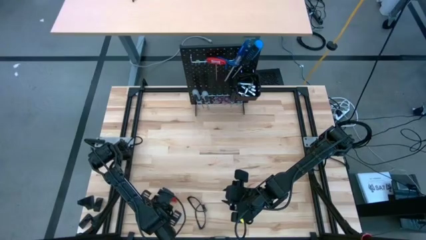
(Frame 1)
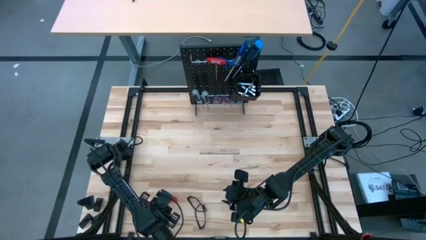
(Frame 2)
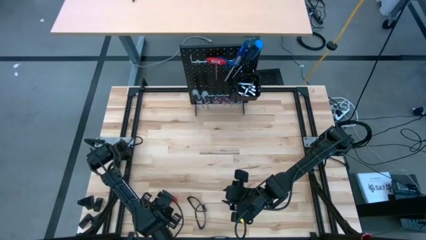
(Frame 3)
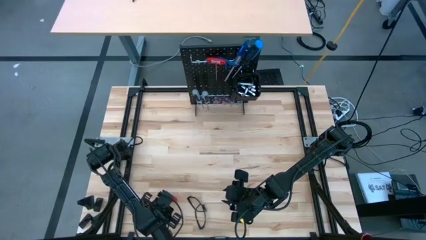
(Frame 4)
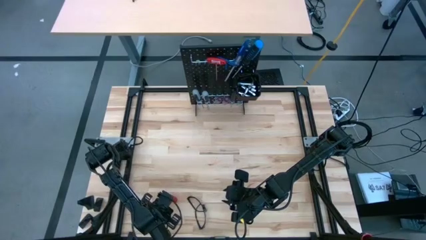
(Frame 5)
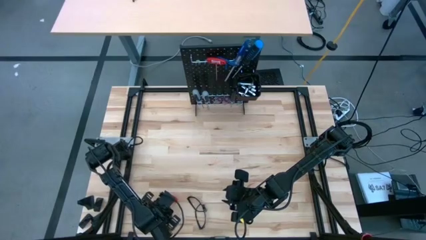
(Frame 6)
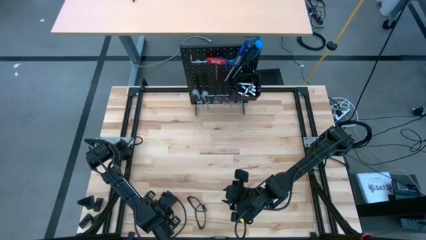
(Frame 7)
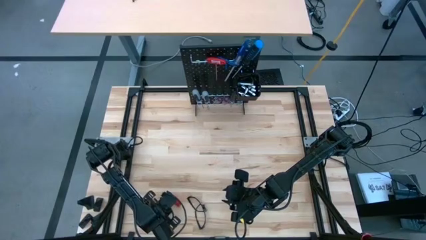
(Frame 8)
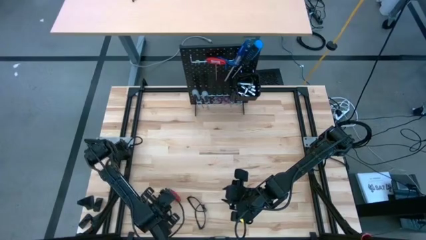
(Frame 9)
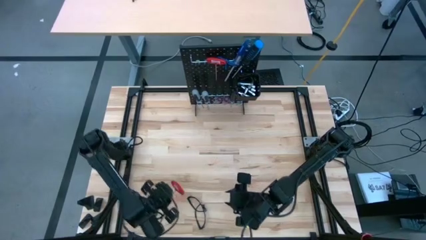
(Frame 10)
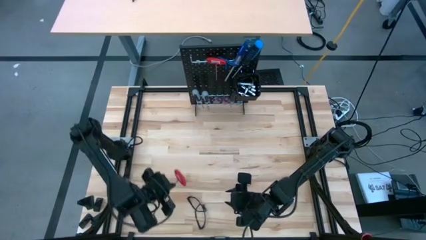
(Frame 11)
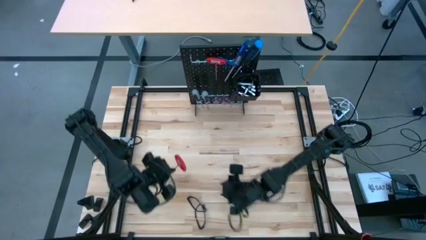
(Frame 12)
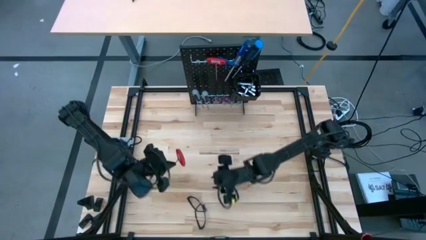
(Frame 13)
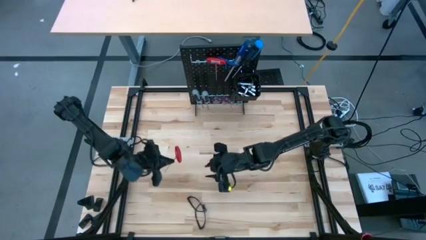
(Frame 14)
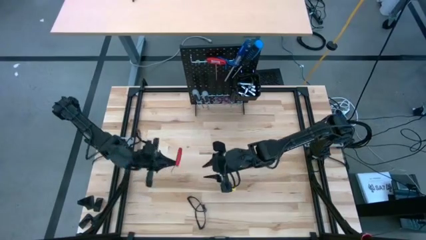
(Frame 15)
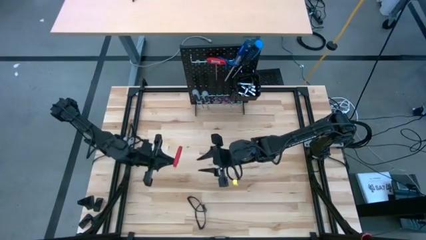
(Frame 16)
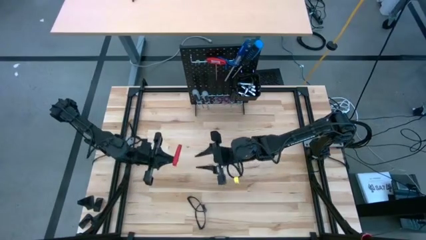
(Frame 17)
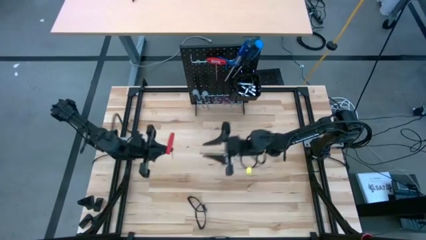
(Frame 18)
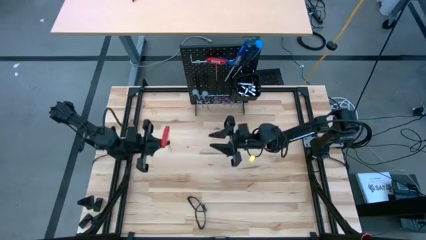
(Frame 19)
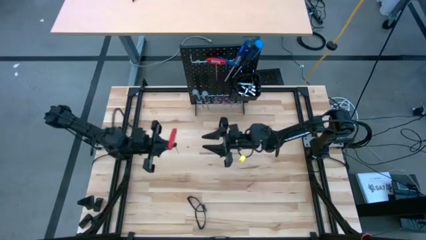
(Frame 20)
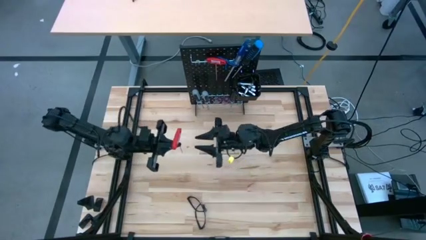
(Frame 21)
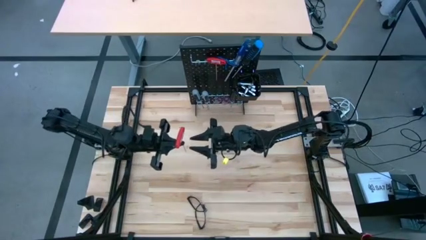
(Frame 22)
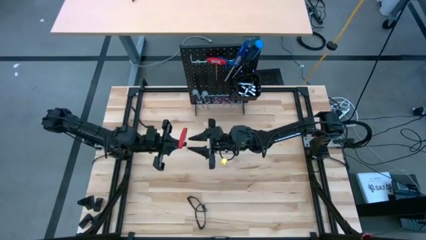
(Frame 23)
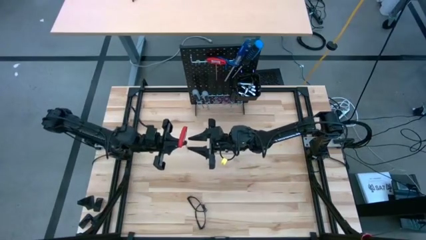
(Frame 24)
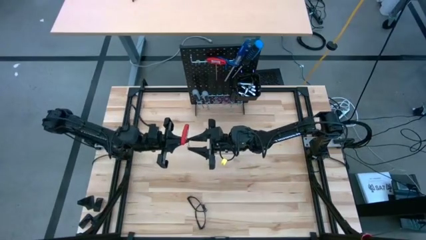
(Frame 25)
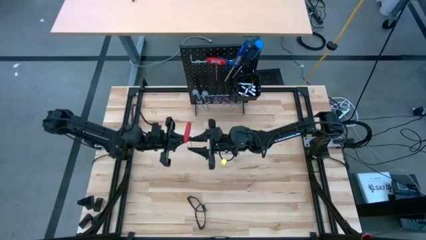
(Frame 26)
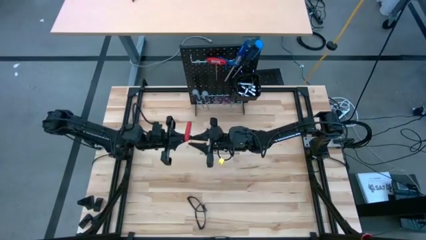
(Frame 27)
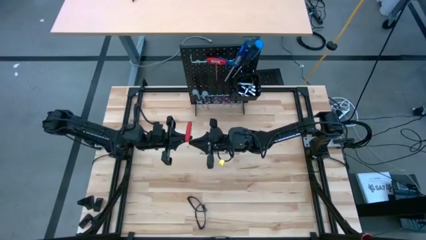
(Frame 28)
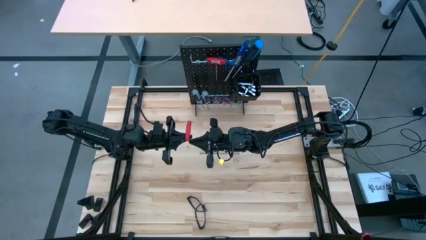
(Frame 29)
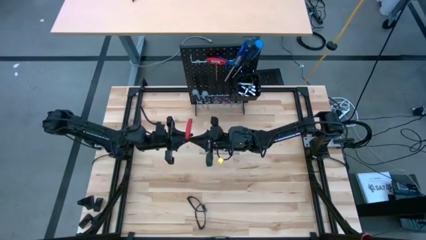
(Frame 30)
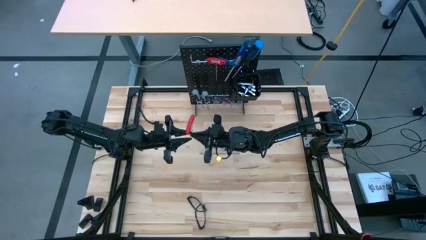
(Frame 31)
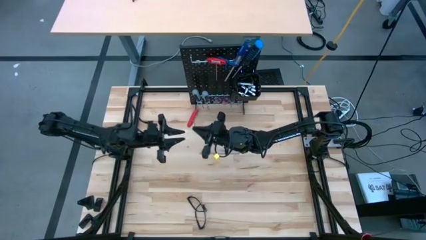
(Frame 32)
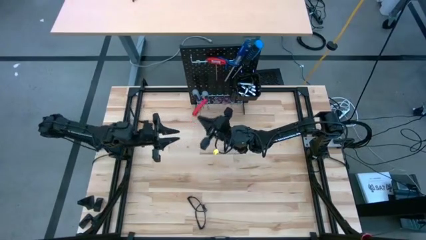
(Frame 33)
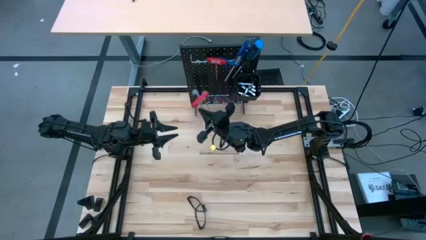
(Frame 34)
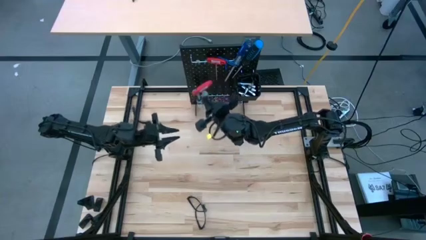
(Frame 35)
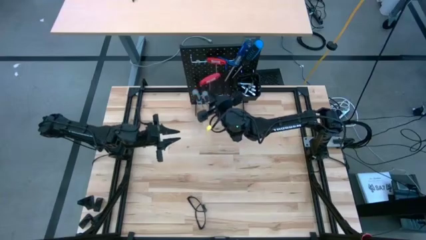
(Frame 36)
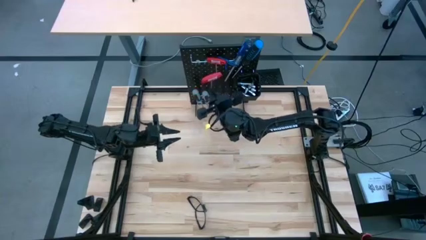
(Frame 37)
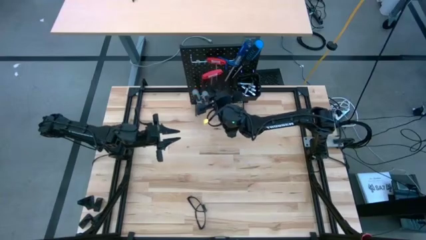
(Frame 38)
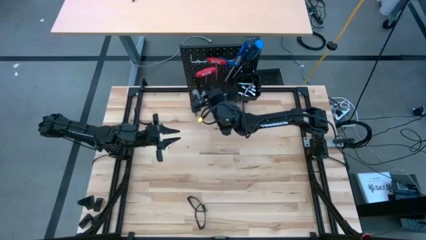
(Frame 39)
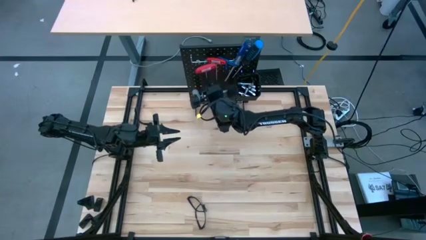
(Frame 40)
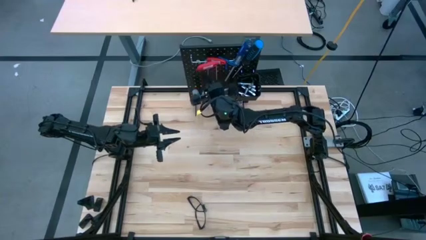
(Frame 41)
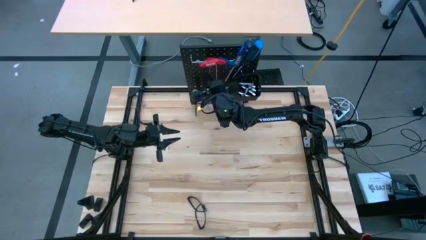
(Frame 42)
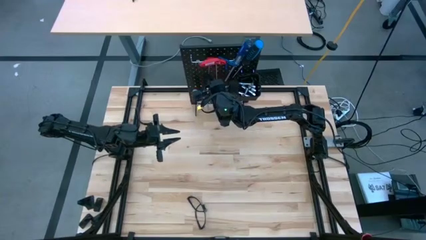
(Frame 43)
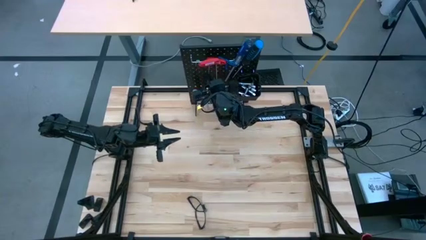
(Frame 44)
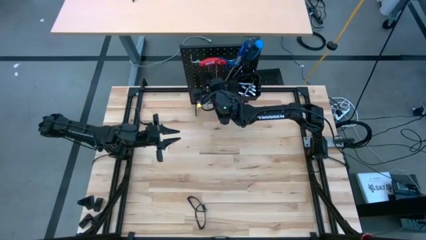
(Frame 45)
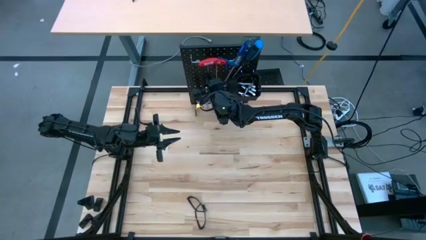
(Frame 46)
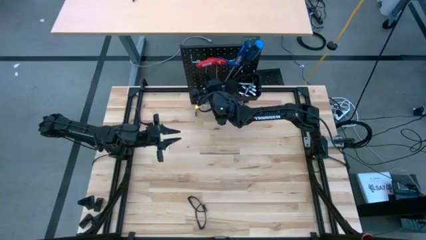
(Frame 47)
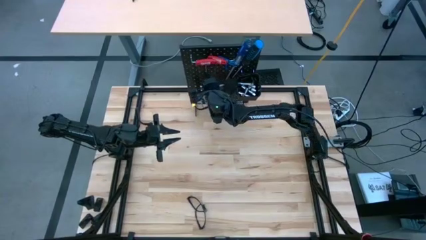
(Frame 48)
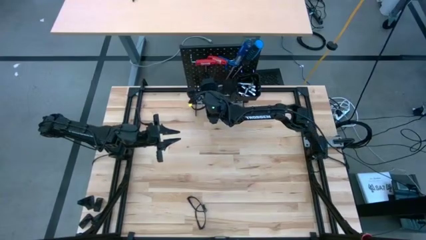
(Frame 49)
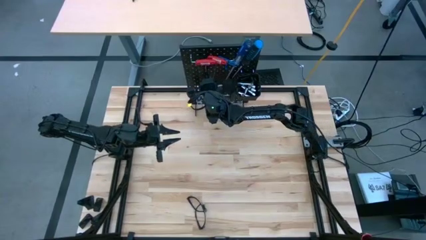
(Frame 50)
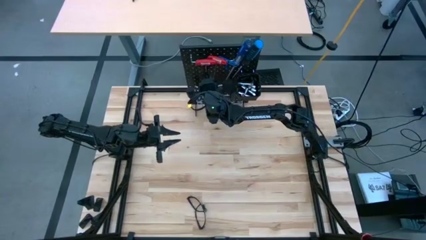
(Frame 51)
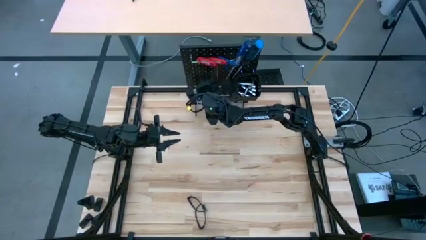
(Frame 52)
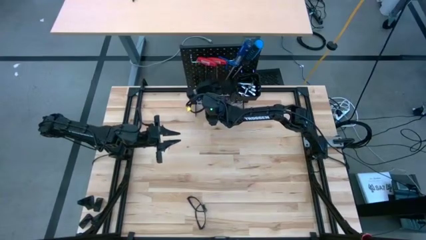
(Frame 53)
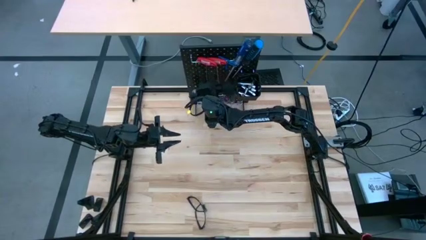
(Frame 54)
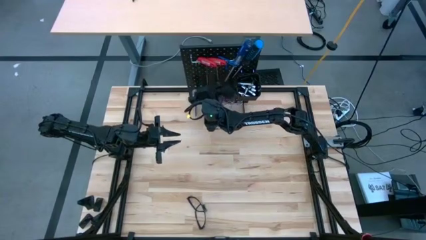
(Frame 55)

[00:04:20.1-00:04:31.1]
Task: Hang tools onto peg board
Hang the allen wrench on the pegboard

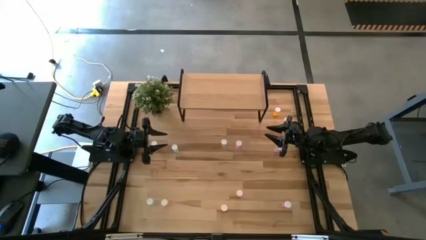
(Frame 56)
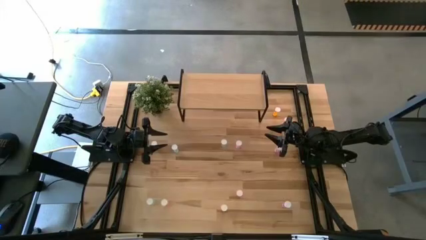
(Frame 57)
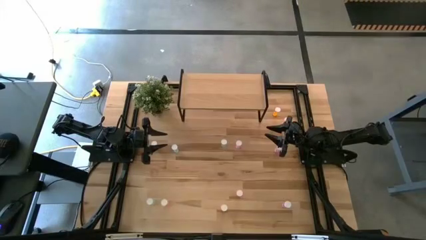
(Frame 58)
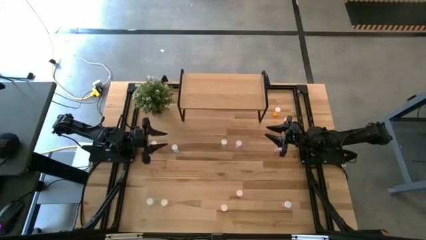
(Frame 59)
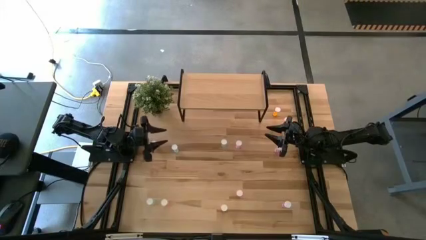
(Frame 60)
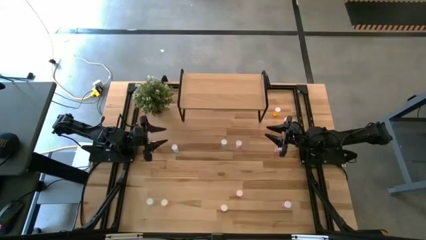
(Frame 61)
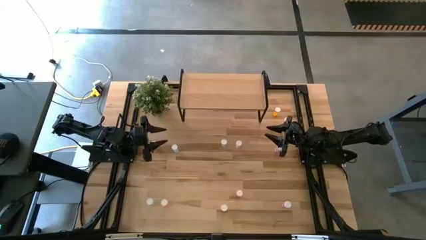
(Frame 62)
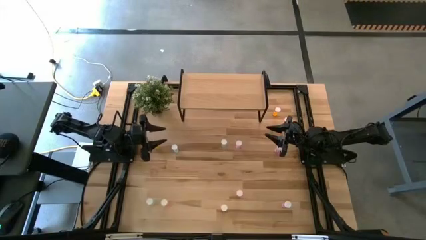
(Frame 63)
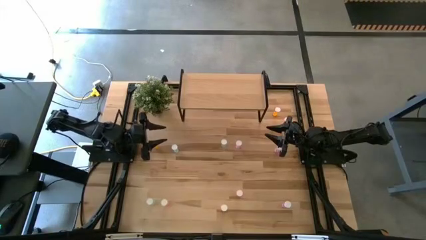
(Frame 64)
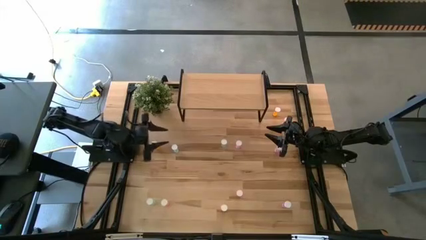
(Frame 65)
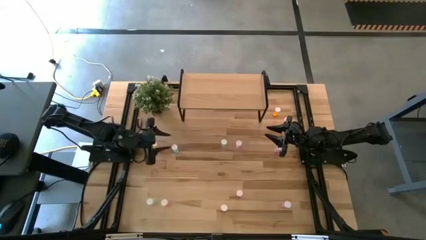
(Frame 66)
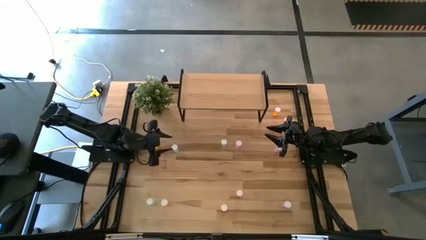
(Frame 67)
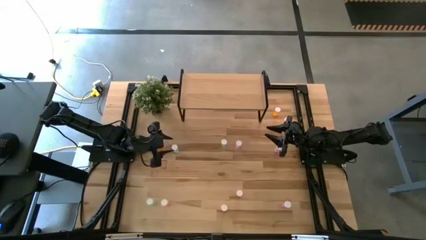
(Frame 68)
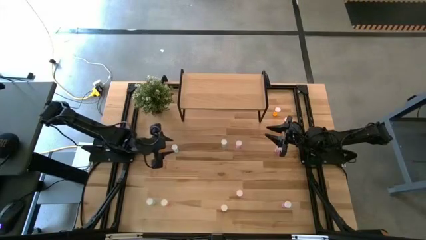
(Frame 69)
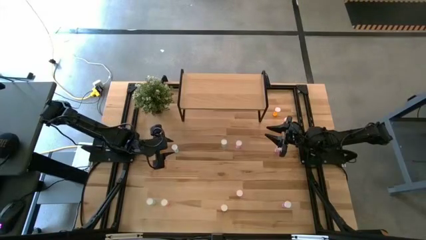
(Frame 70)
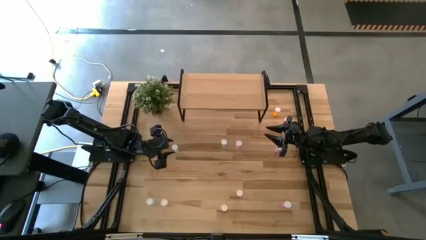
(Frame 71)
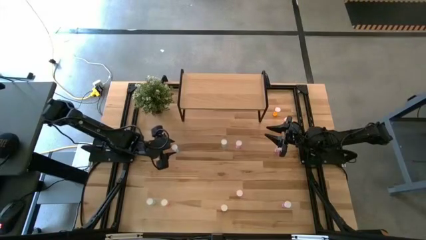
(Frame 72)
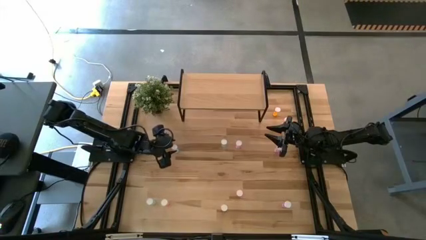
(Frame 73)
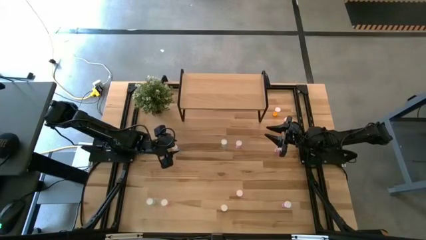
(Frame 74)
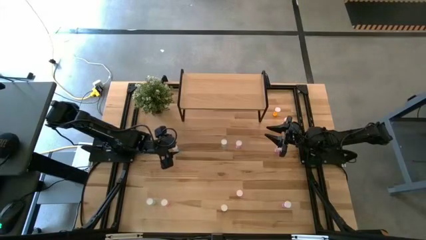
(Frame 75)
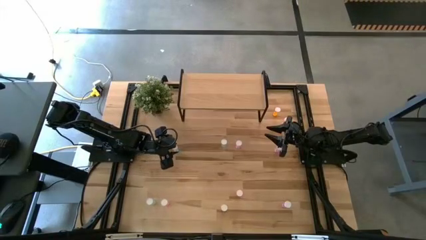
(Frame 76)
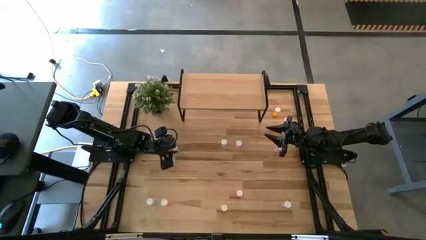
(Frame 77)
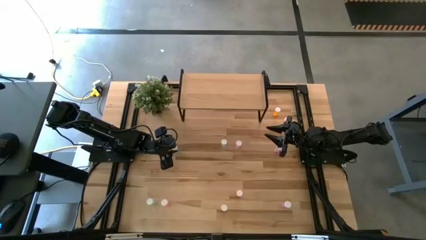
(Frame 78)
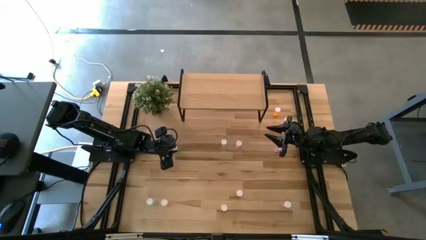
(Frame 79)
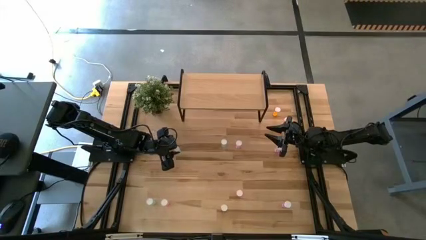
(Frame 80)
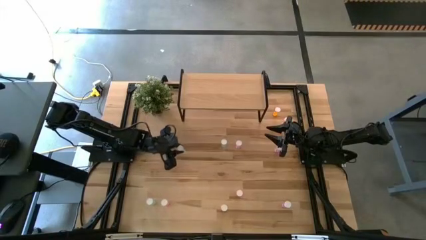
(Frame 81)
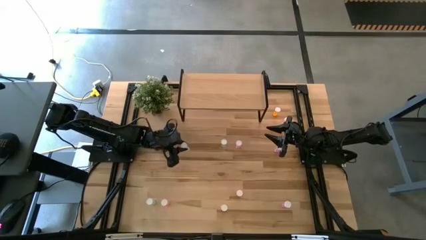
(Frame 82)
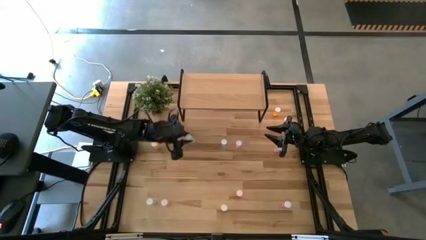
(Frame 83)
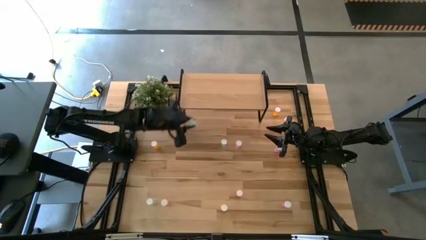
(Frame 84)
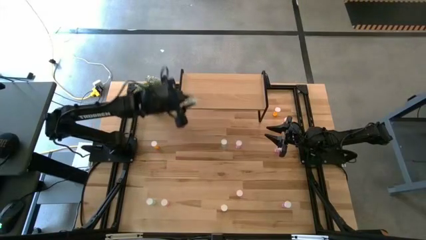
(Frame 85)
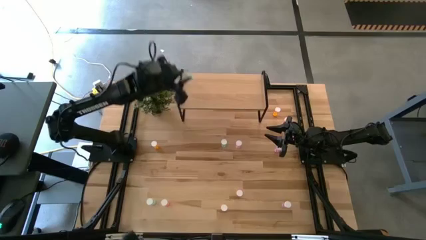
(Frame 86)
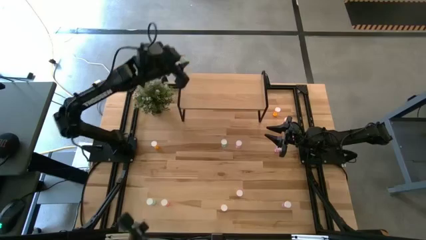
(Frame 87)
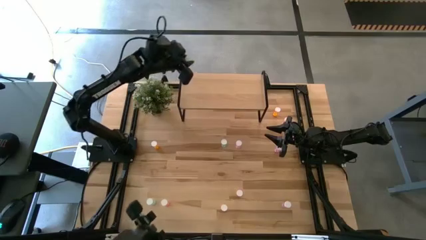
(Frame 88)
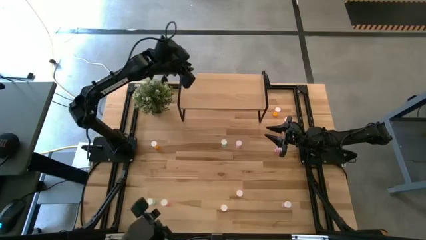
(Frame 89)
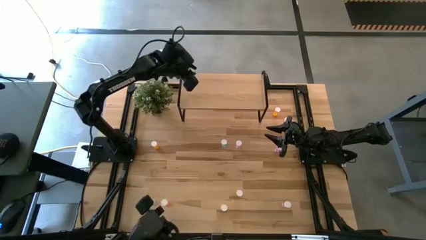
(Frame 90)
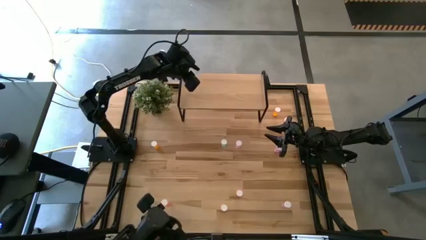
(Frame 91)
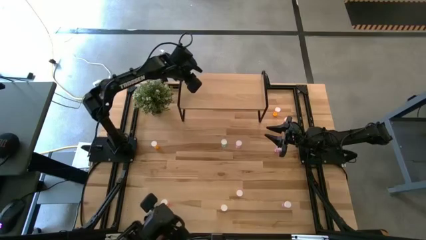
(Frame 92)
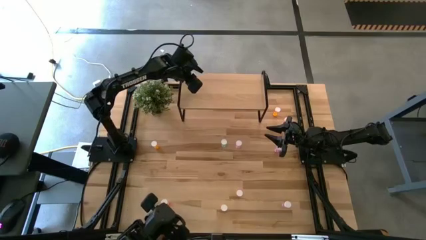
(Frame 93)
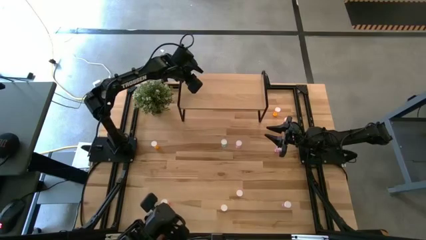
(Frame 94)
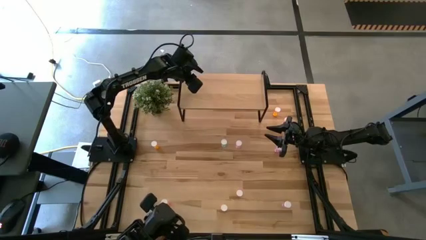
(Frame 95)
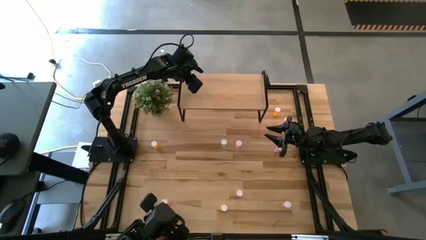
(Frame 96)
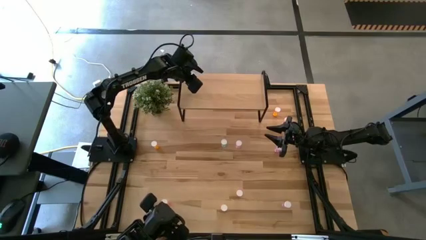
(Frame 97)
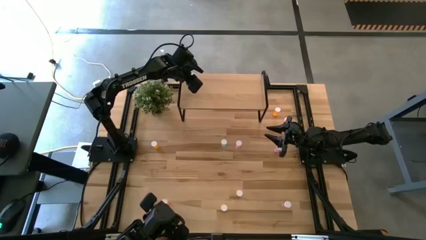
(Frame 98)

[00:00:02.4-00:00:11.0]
Task: Pick and place medicine bottles onto shelf by color
Put the top left blue pill bottle on the shelf
